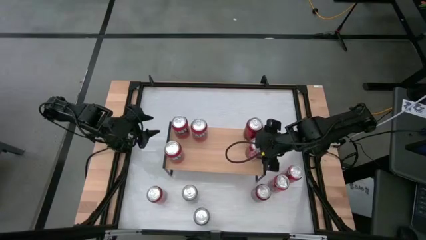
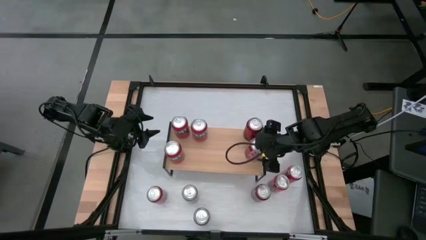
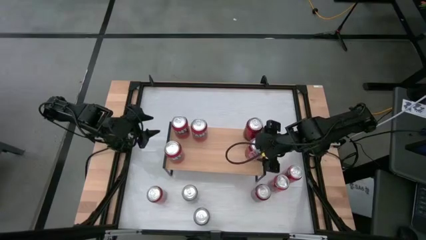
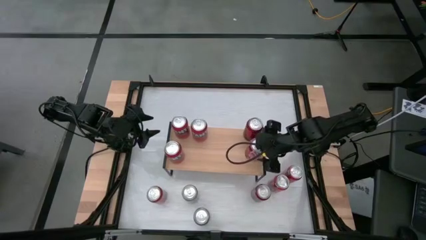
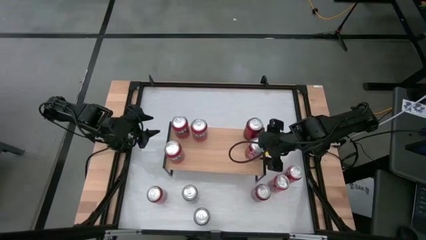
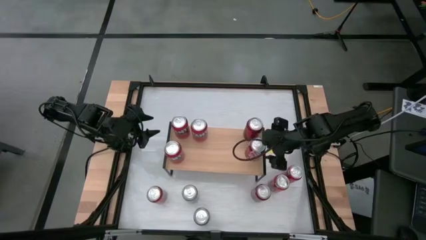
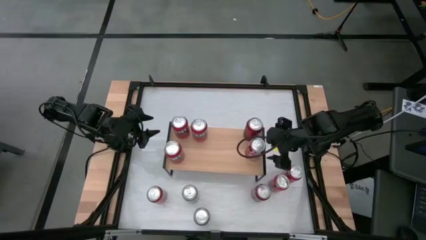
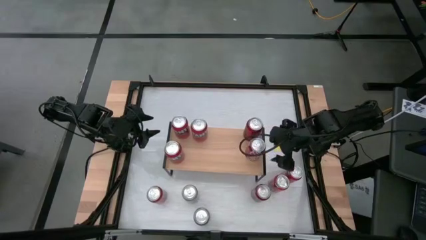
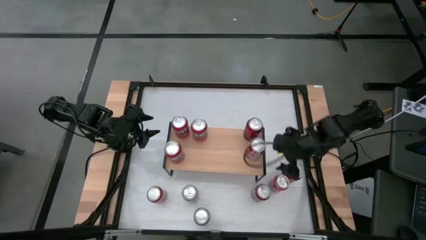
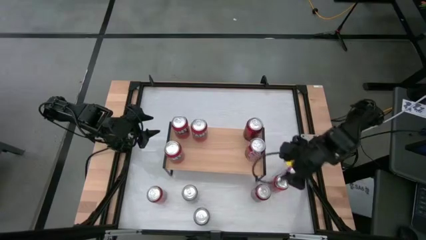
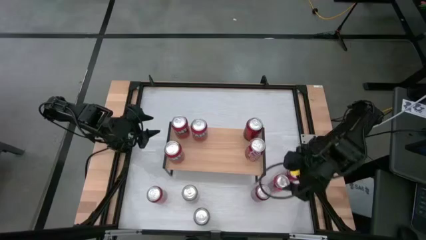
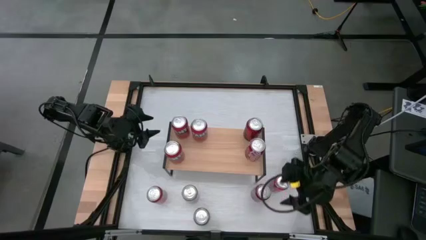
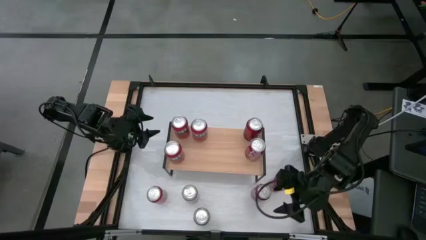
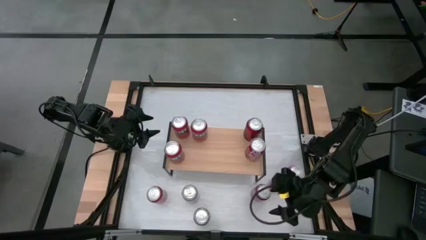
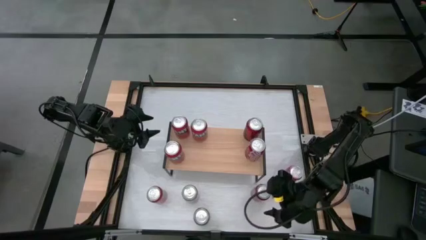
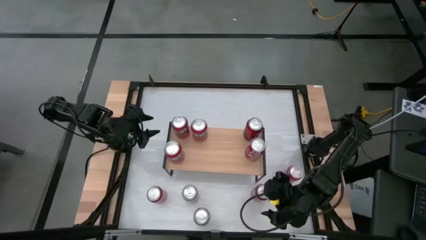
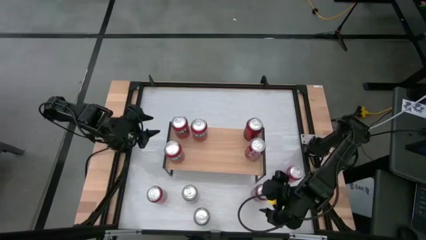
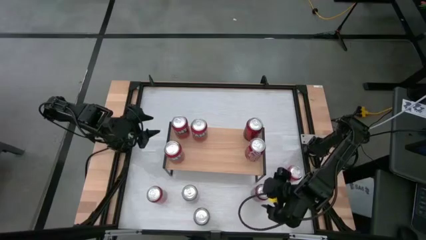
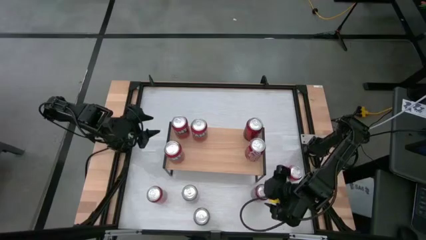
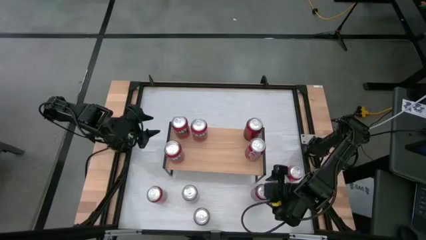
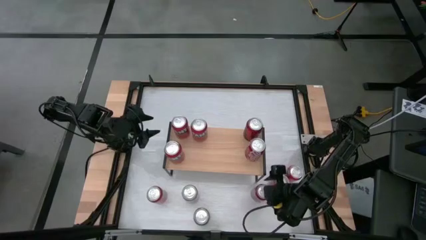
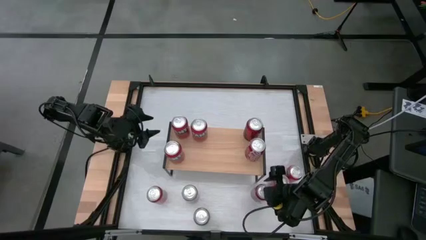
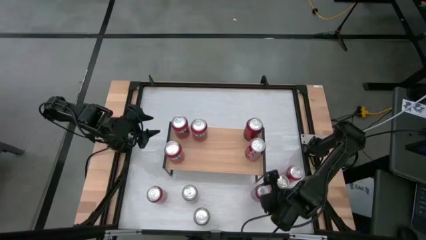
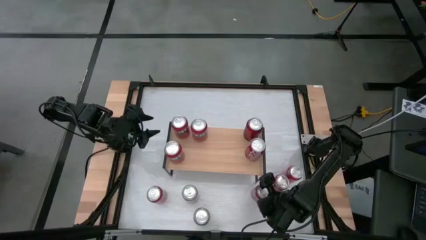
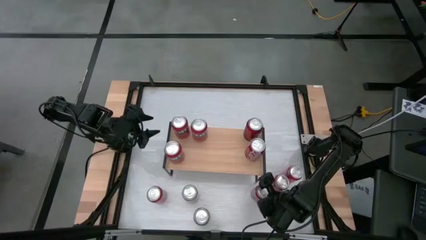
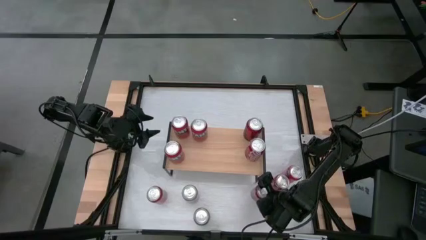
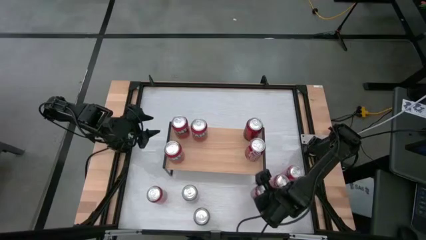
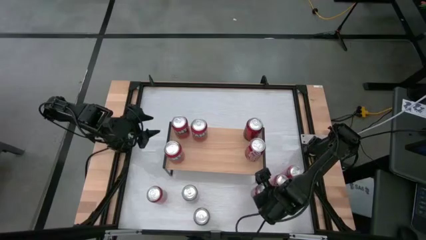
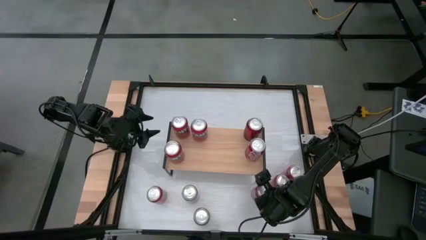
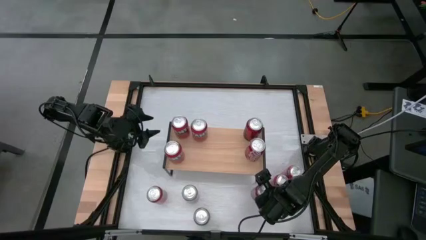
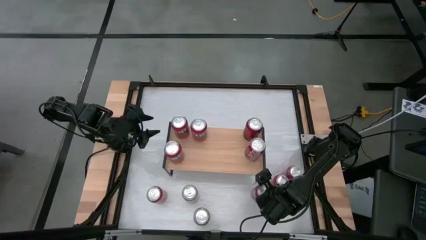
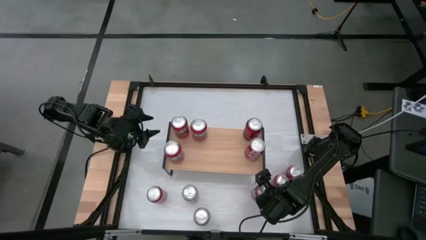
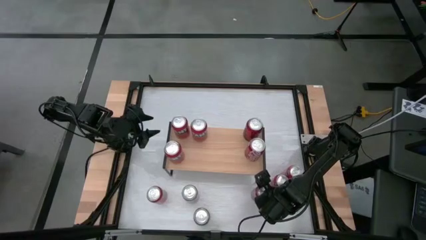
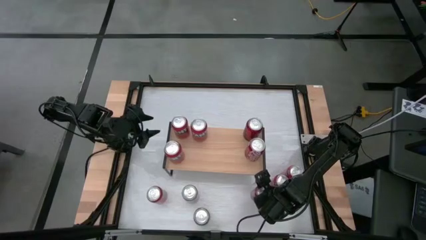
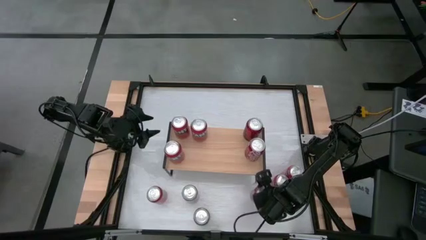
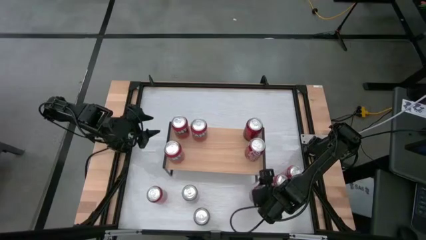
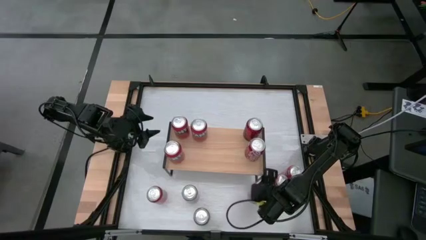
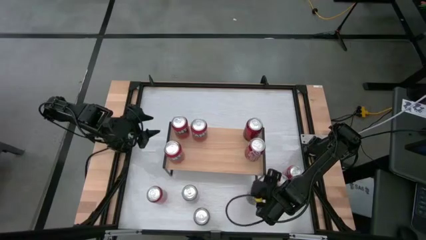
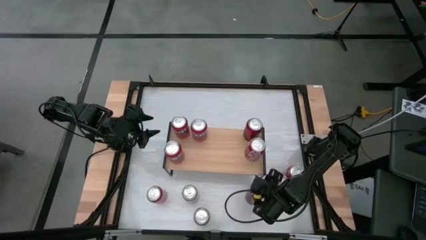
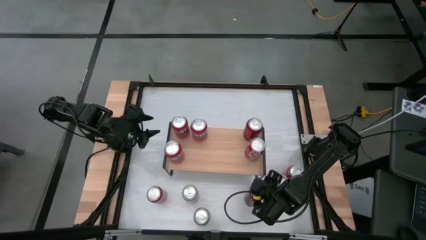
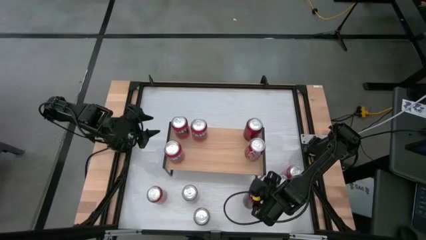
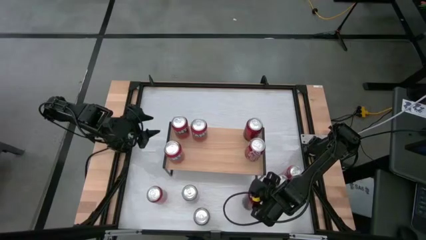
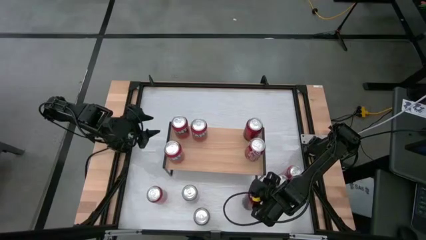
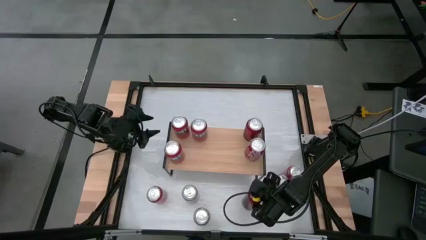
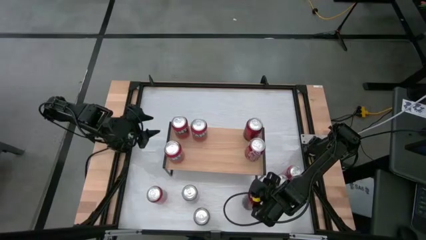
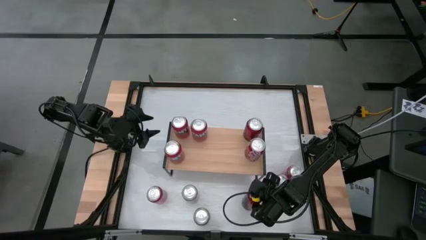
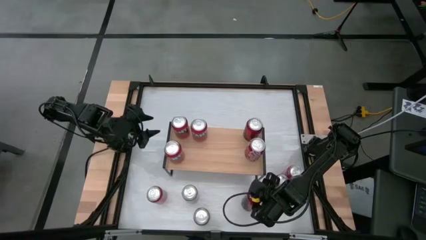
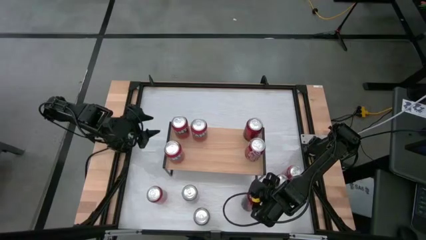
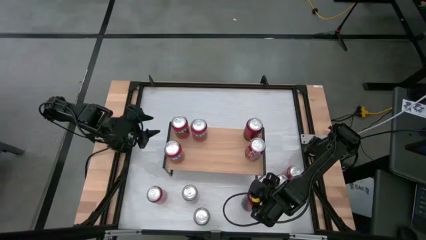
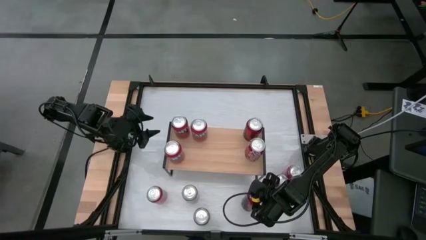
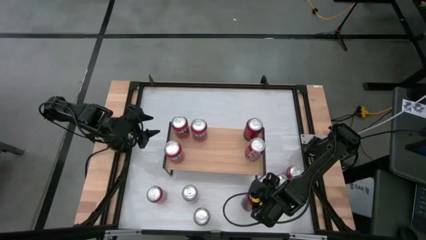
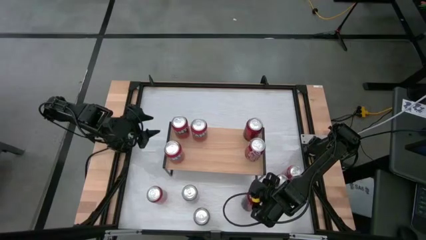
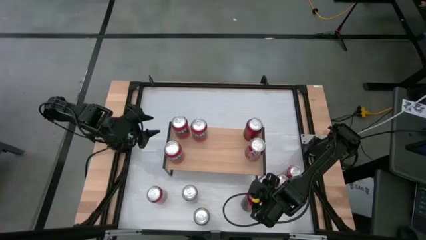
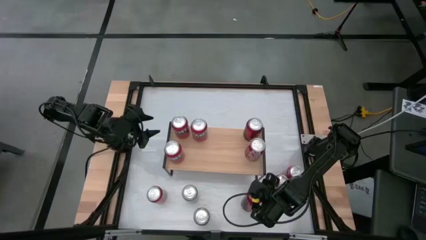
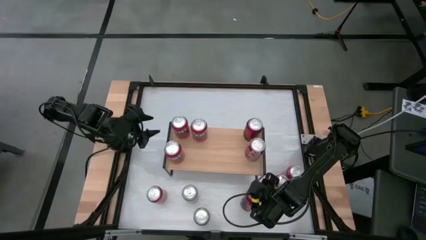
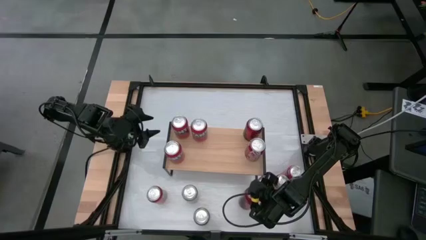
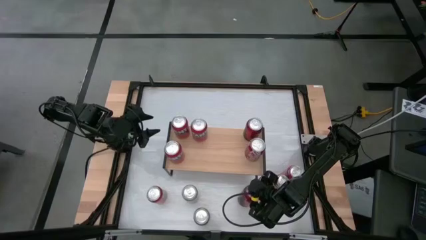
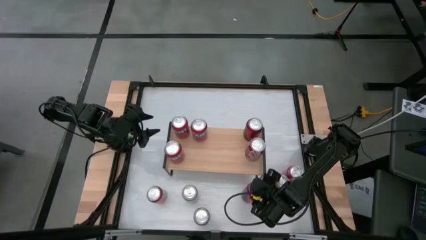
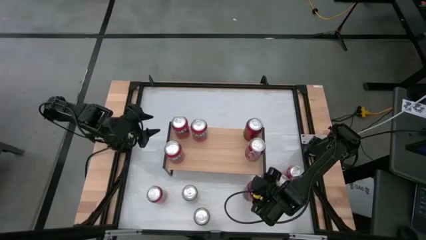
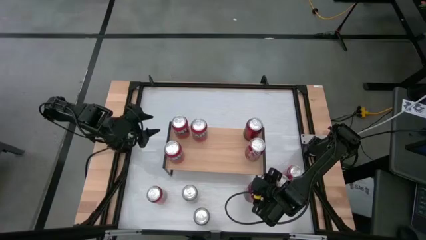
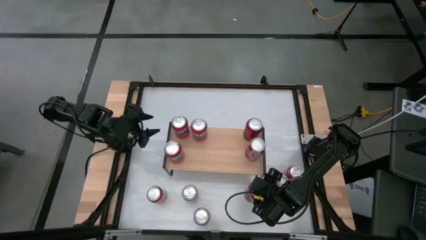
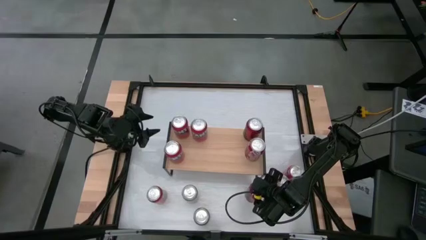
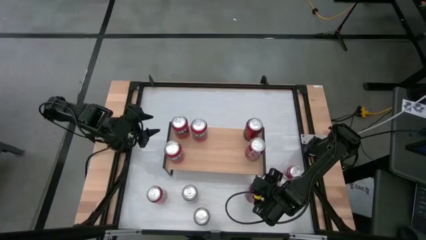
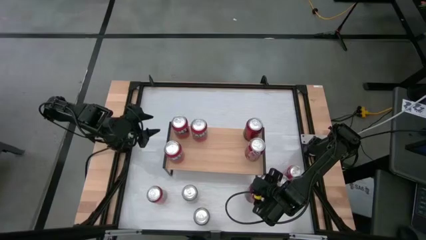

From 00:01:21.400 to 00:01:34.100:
Task: Place canned beverage on shelf
Put the red black soda can on the shelf

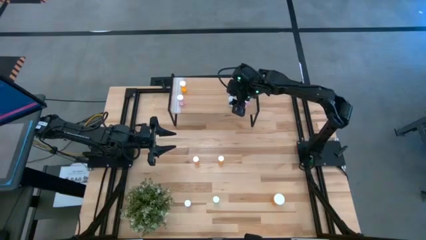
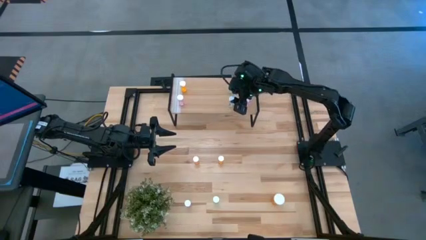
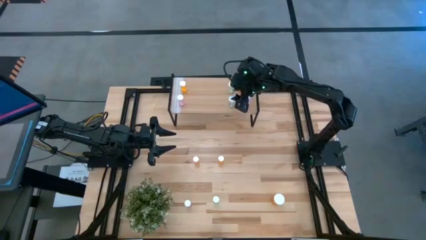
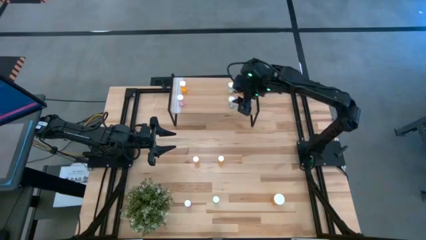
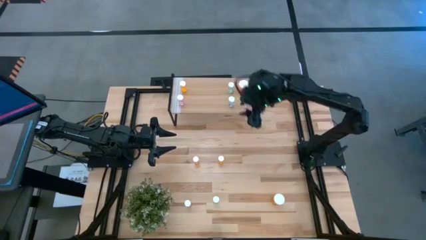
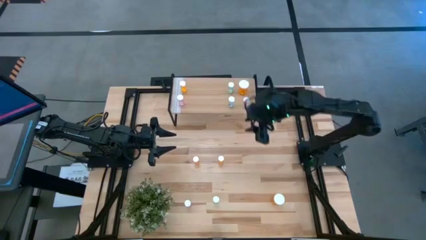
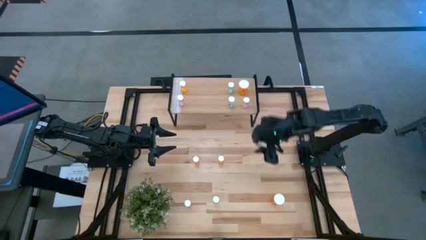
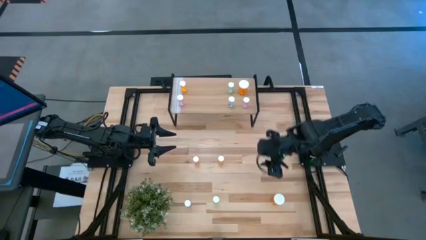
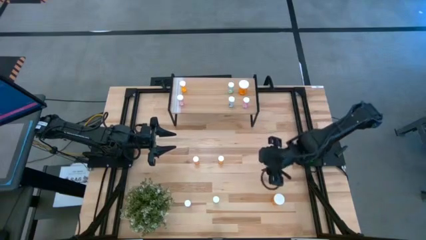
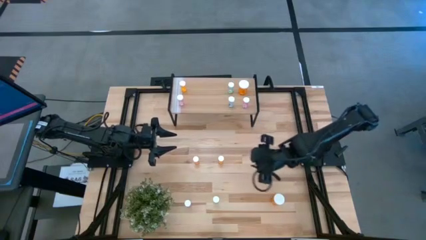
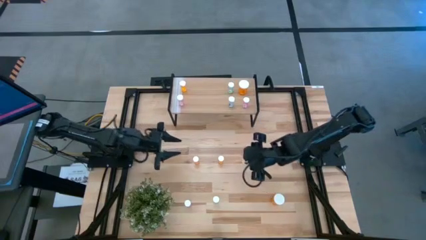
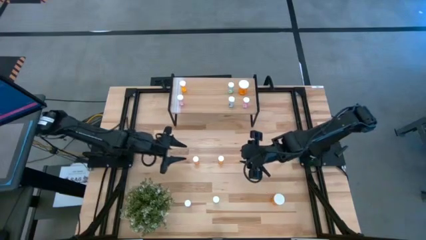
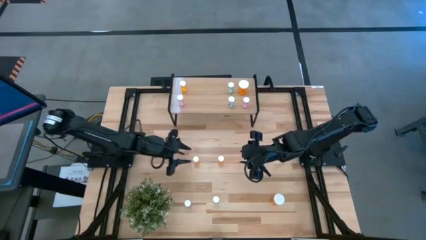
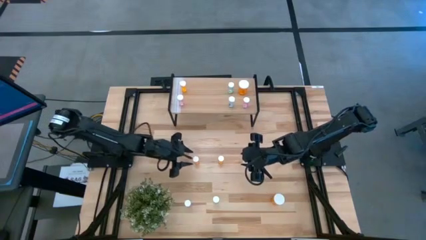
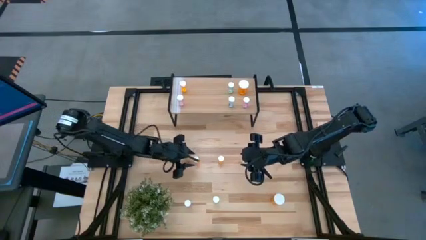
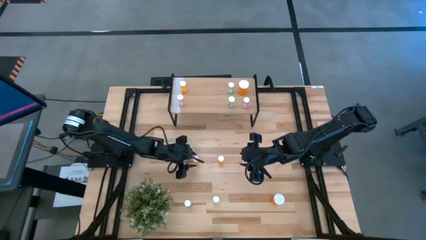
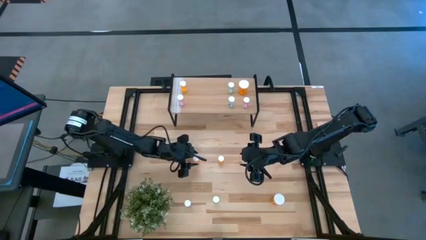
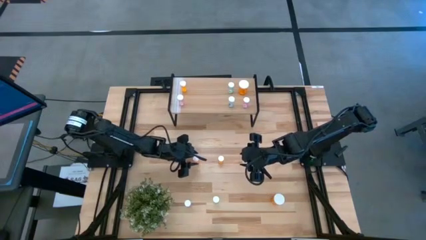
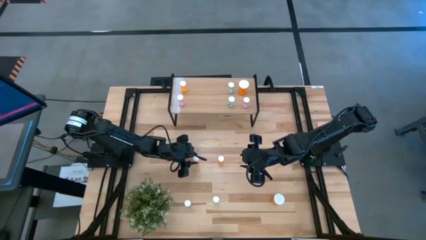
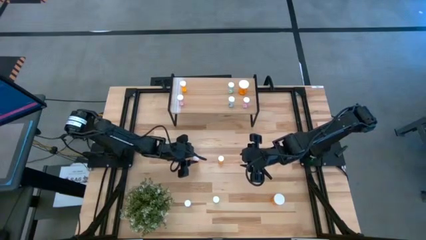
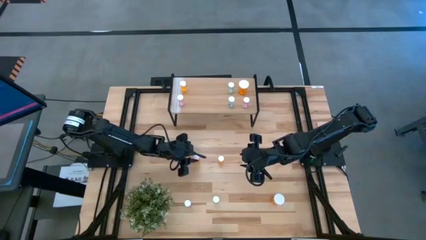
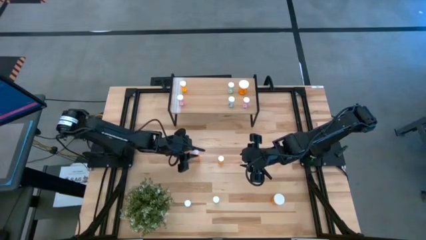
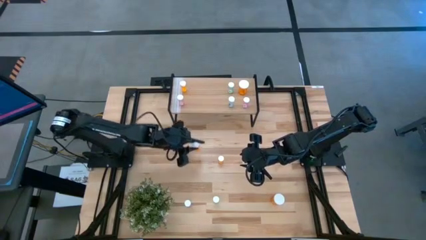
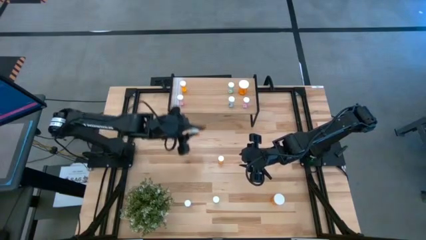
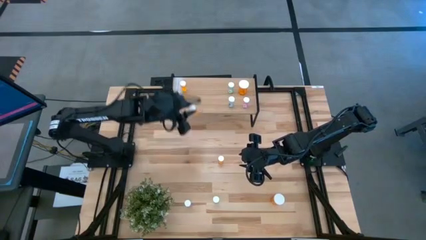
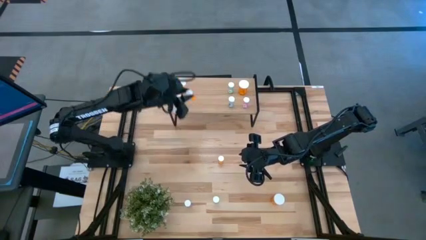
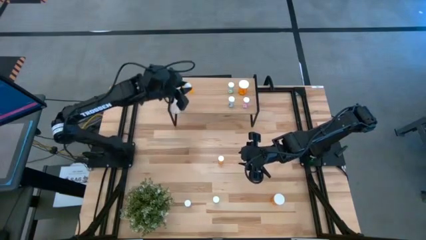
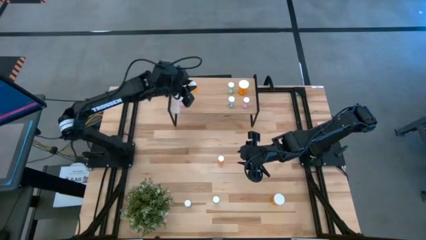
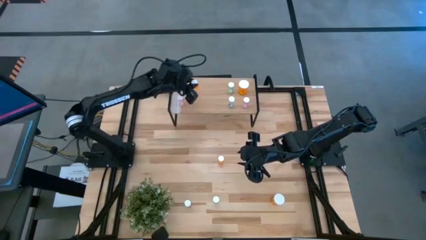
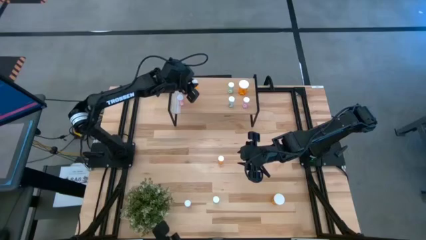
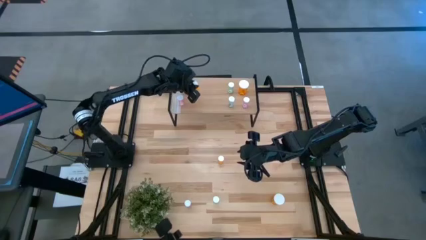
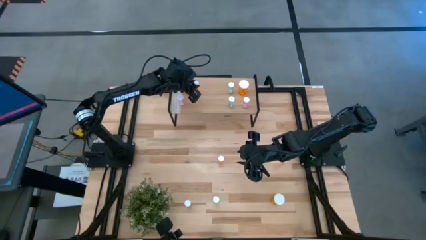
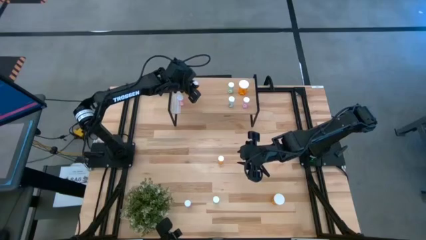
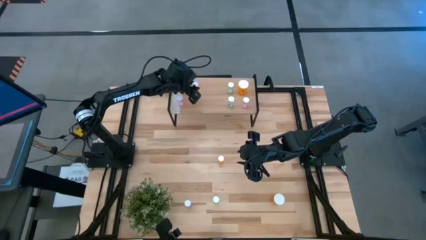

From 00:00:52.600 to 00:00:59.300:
Task: Pick and place medicine bottles onto shelf by color
Put the left small orange pill bottle on the shelf
